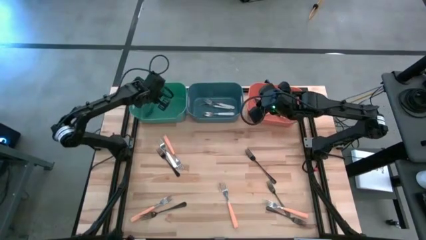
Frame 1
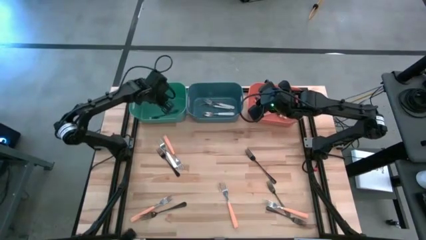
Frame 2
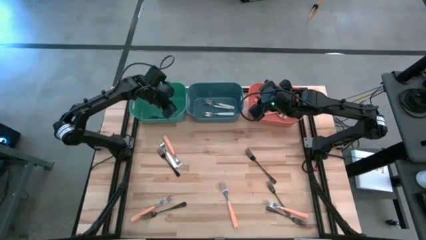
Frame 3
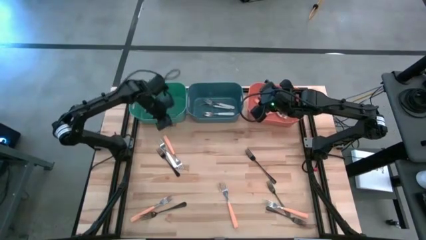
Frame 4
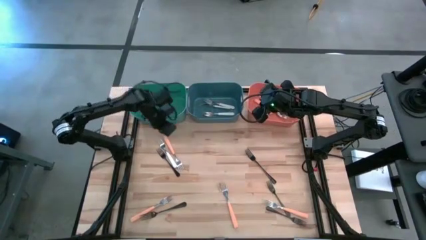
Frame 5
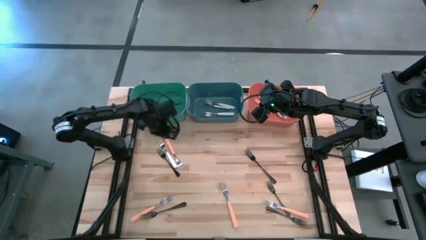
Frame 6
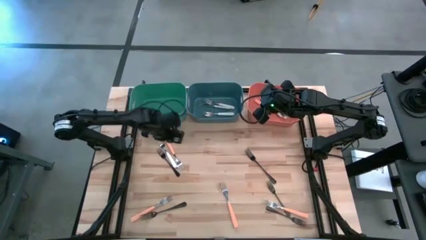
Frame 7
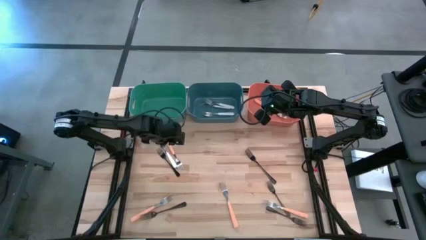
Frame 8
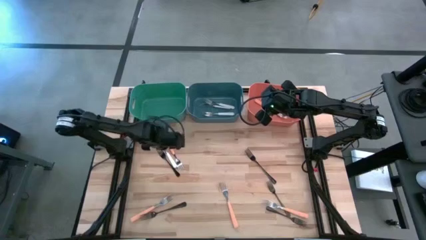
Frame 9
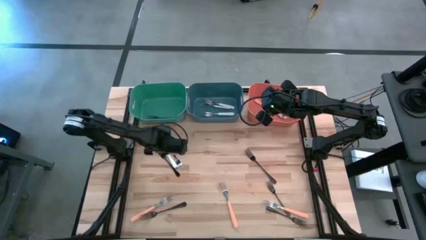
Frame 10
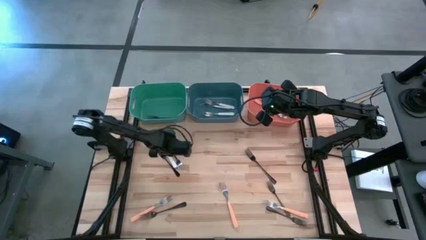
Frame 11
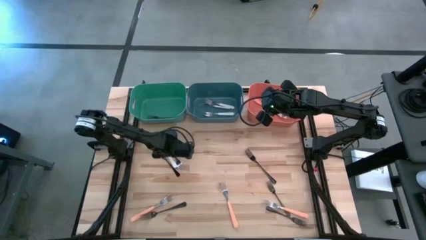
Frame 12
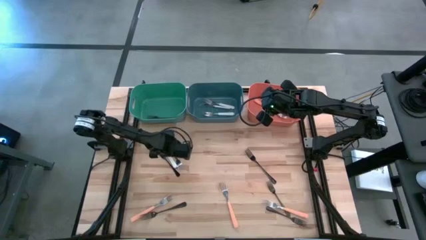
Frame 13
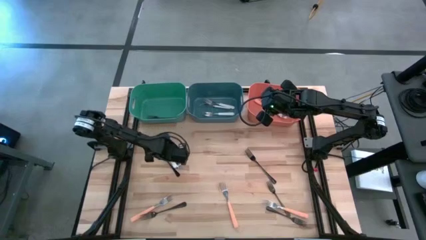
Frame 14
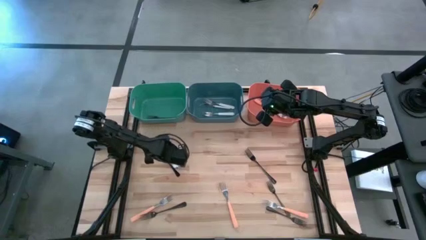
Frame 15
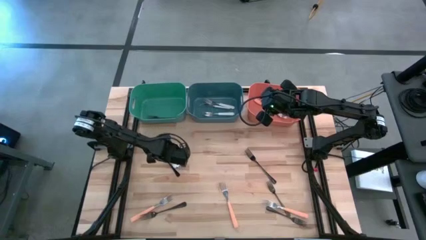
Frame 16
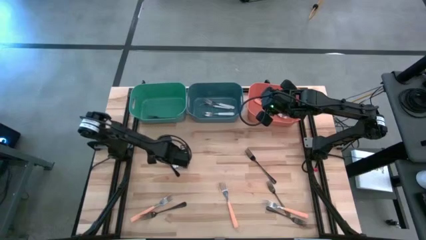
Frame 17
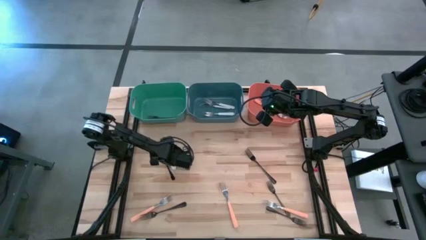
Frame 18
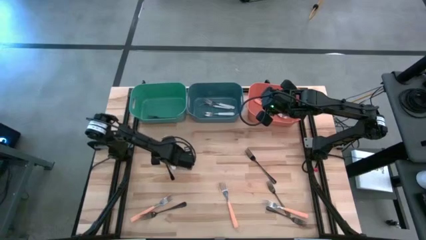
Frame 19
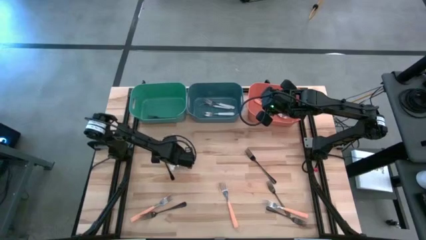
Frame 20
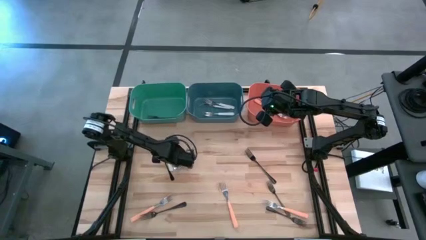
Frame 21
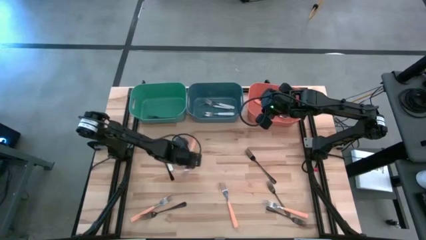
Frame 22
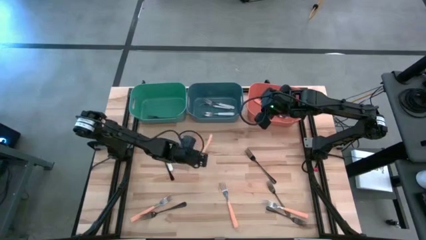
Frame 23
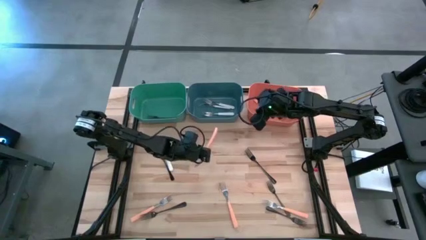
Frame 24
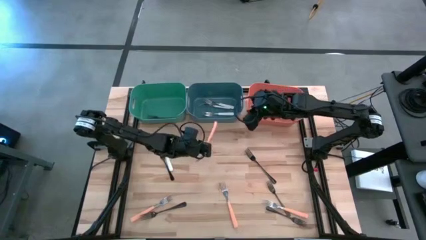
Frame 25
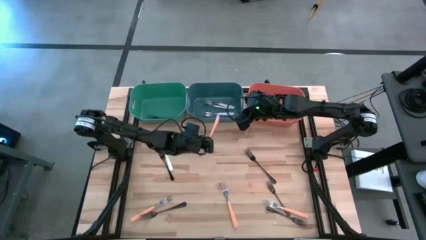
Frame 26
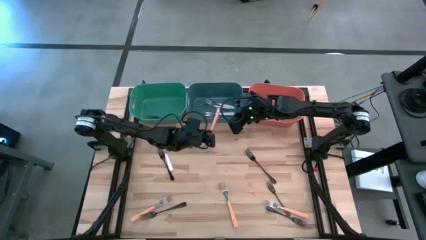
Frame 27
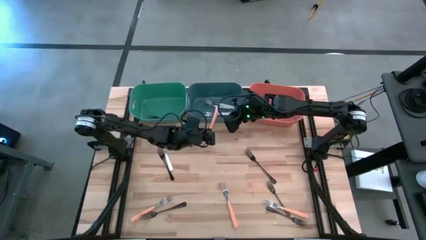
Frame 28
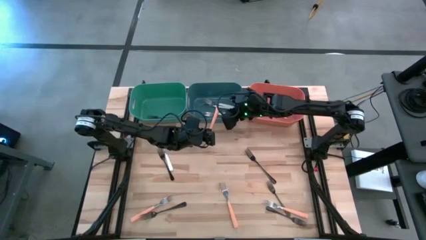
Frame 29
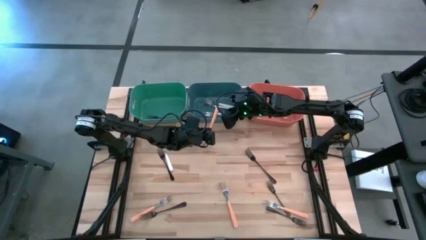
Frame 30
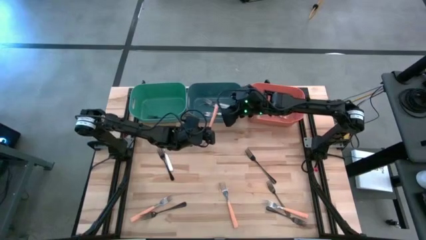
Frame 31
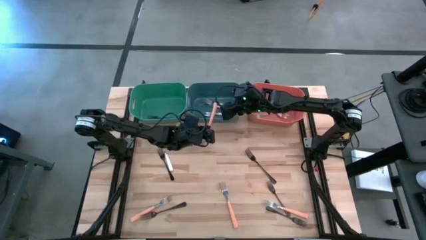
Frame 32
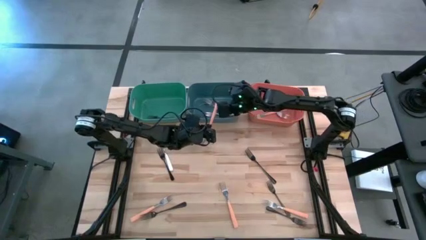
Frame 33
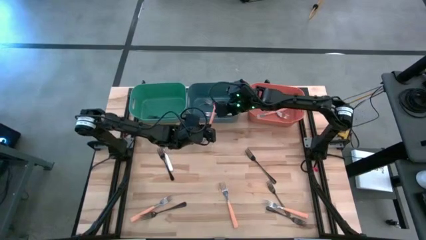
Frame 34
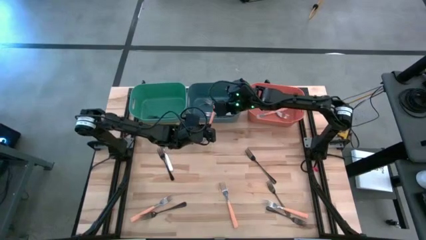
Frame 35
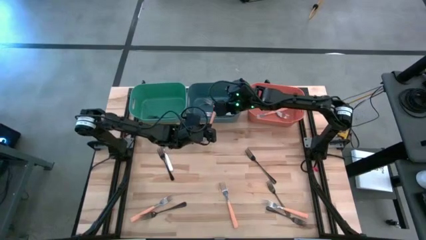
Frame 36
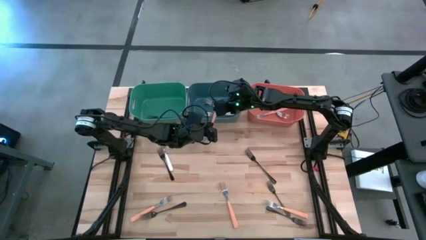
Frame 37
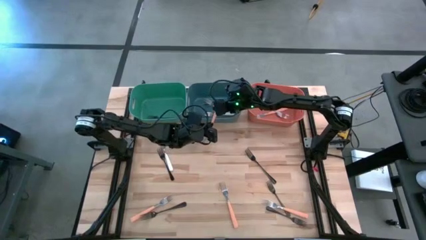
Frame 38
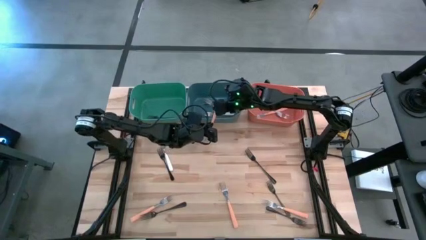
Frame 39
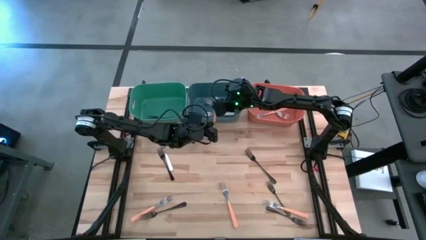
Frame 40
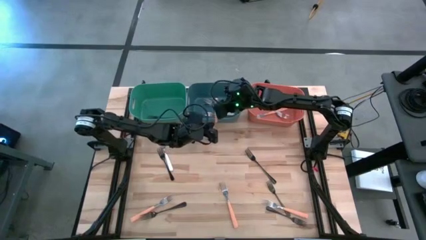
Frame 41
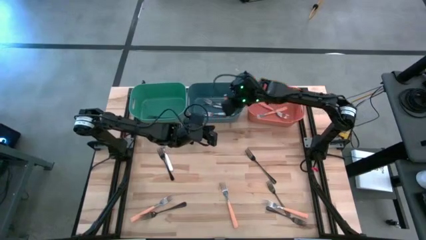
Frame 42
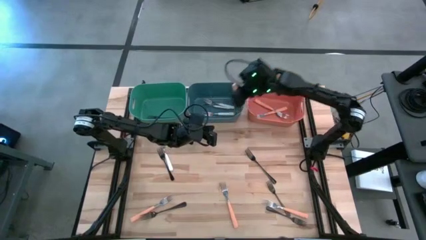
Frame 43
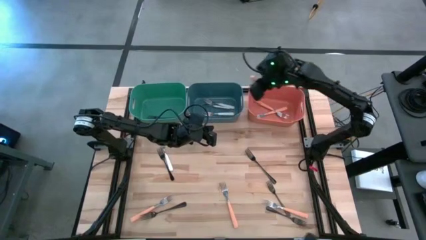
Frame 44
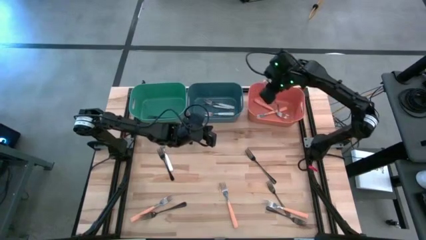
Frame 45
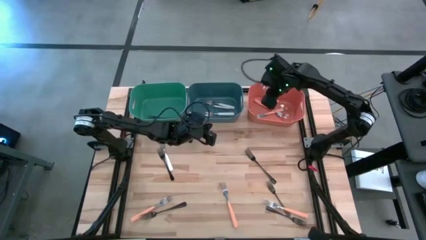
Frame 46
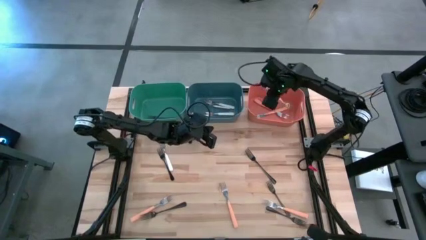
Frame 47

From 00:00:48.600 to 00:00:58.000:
Task: Sort silverware by color (type)
Put the orange fork into the orange bin

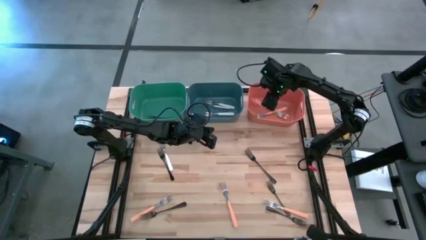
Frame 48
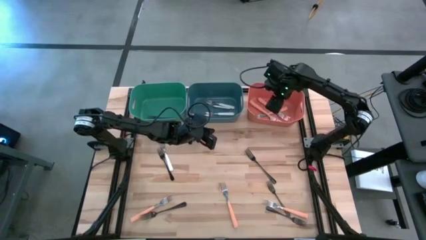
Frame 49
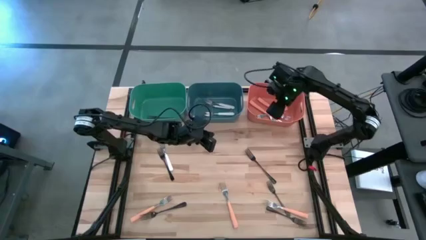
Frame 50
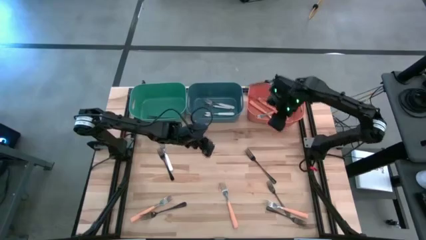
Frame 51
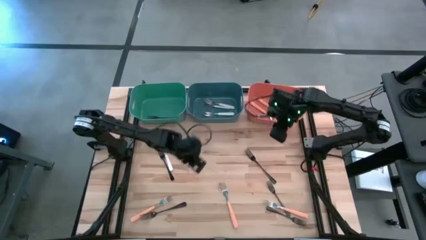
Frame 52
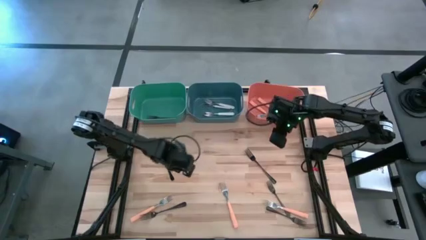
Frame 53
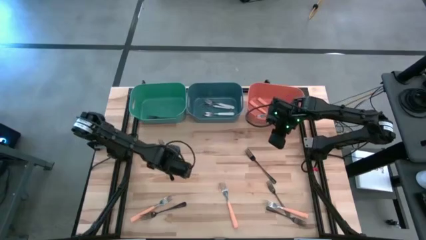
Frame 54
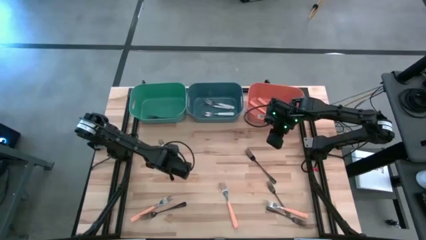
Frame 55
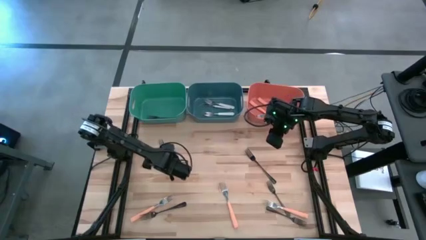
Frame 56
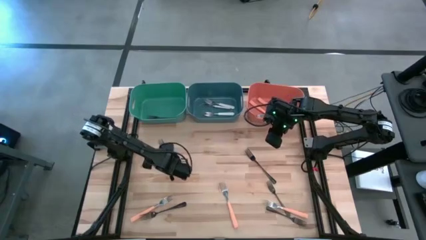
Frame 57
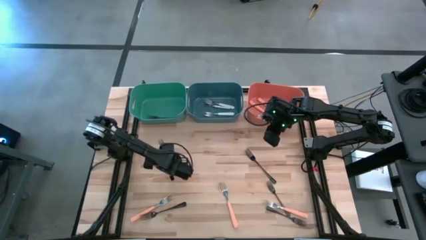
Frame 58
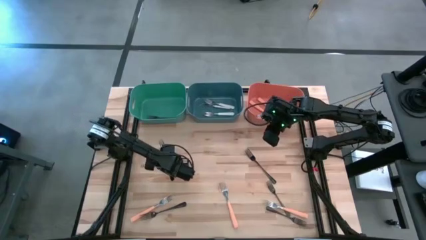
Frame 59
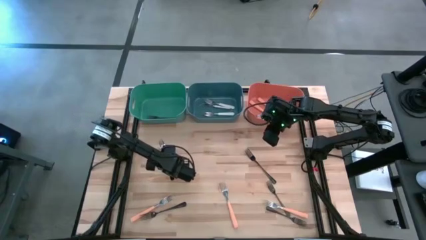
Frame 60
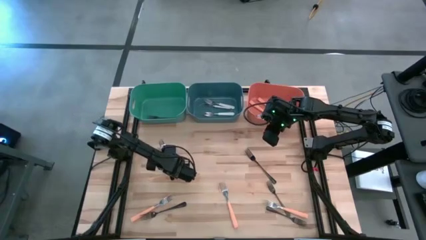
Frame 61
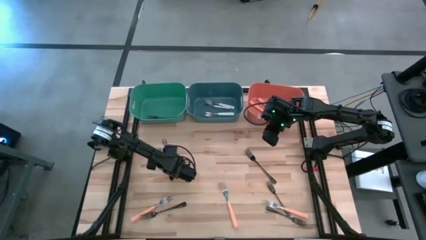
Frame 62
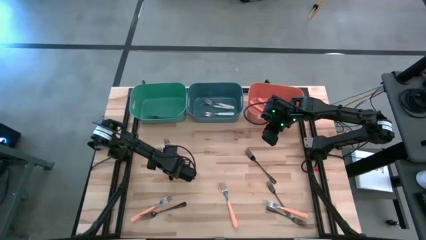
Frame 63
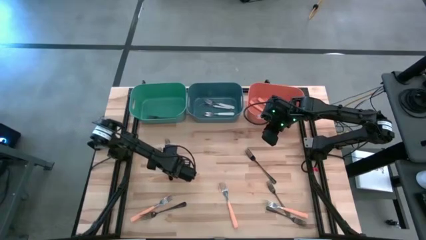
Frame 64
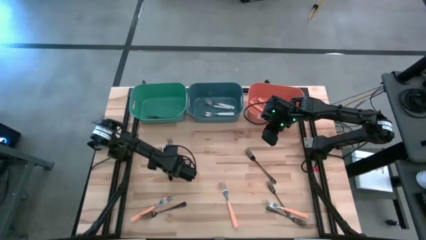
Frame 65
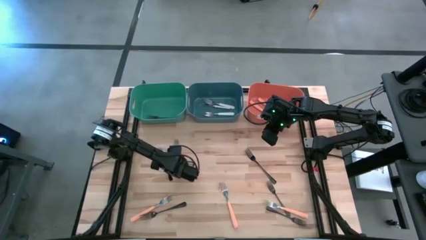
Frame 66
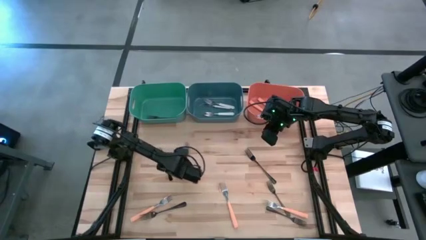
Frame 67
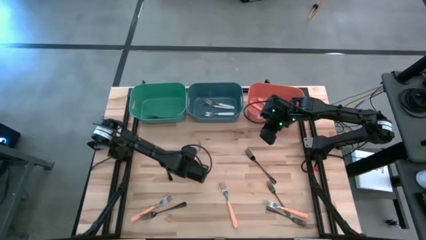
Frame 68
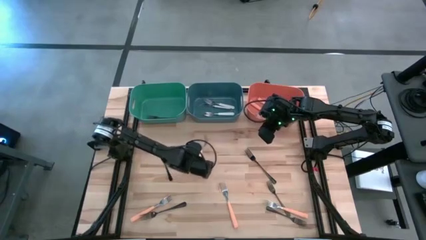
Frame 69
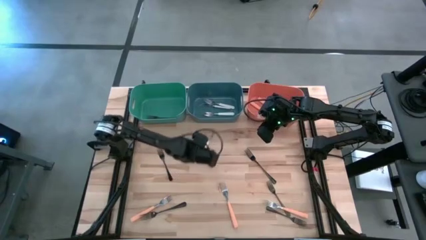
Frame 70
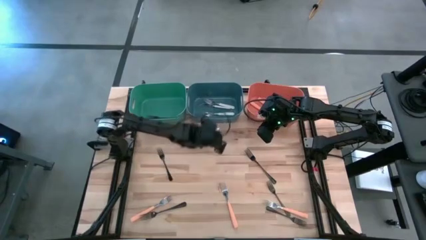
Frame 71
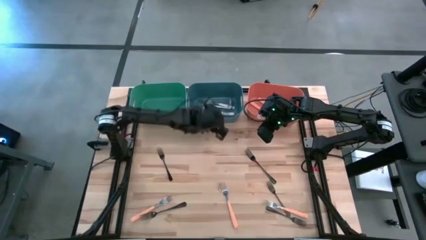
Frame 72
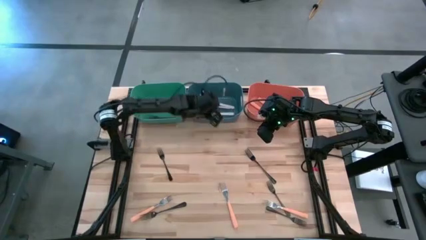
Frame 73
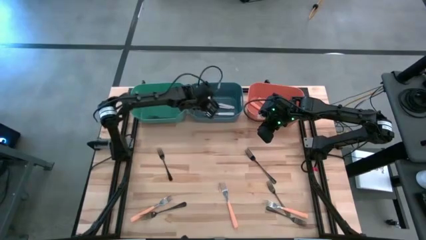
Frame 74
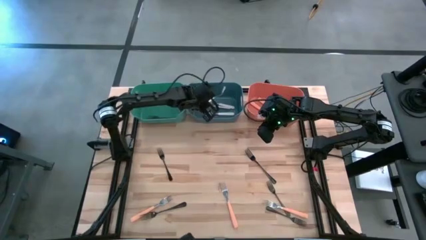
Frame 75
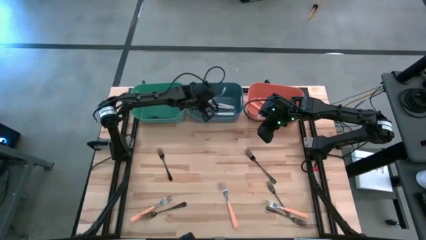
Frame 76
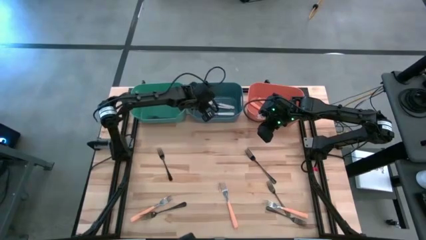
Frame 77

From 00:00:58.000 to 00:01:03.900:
Put the white fork into the blue bin

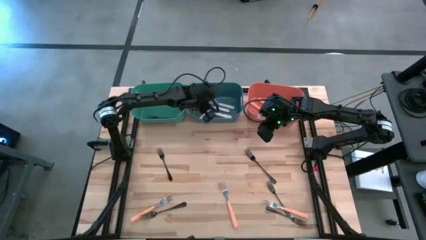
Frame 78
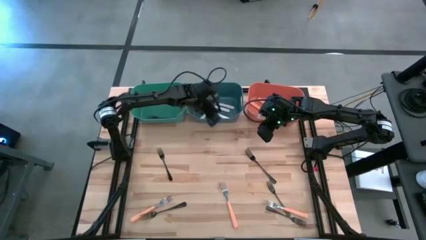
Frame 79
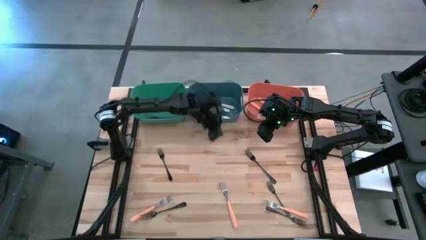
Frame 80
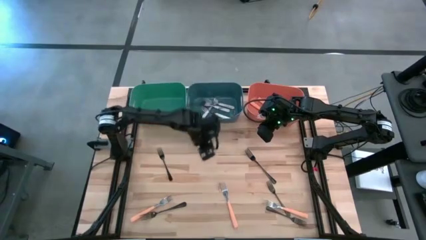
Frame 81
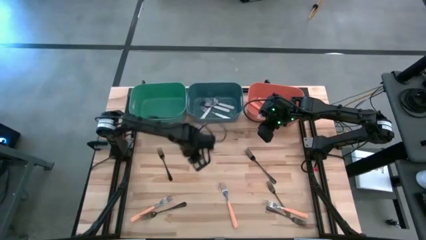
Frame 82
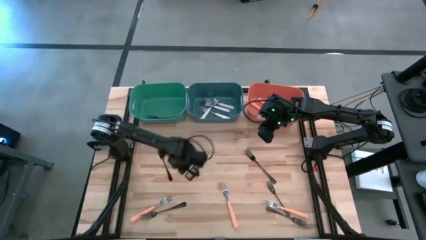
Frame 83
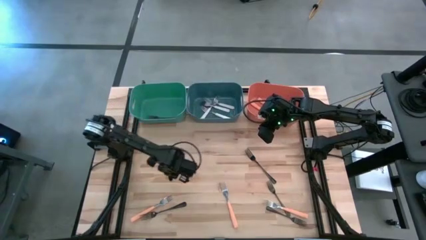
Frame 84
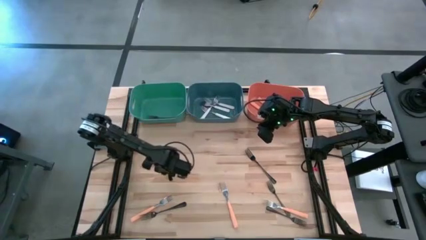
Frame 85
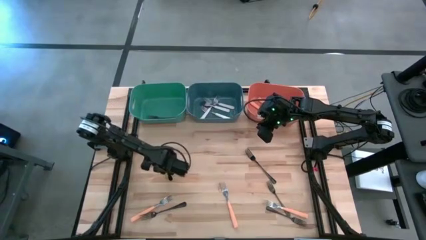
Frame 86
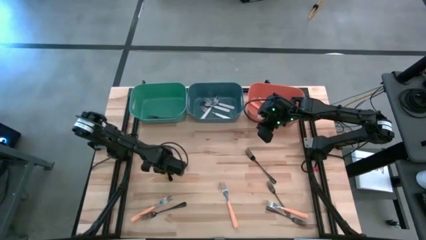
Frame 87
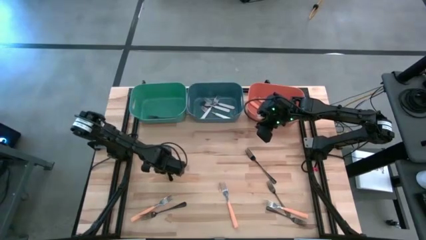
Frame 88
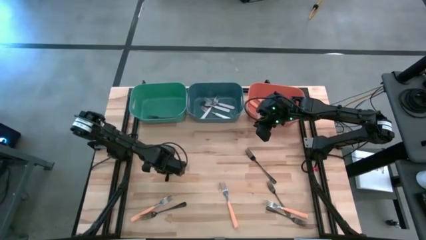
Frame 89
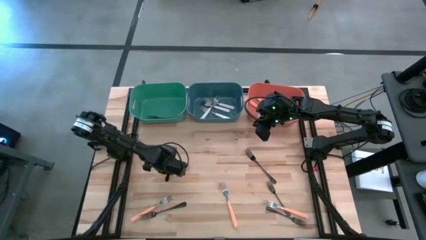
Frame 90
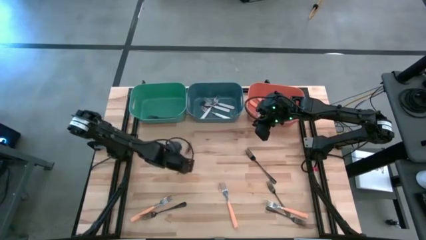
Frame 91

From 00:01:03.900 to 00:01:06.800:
Put the black fork into the green bin
